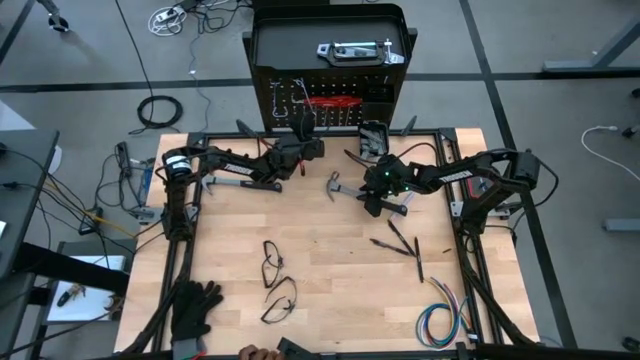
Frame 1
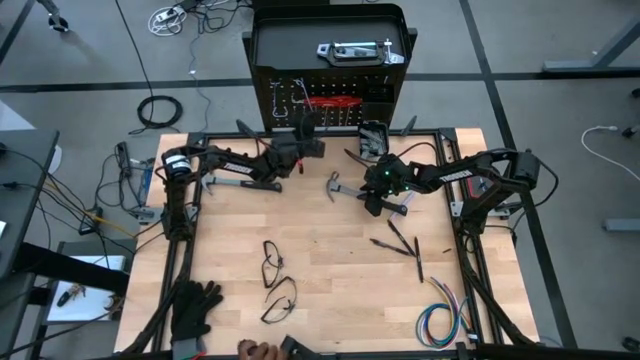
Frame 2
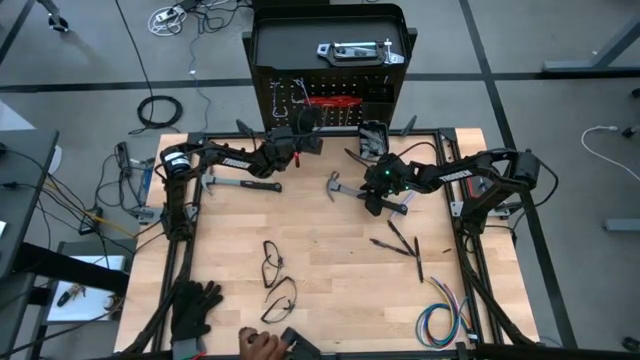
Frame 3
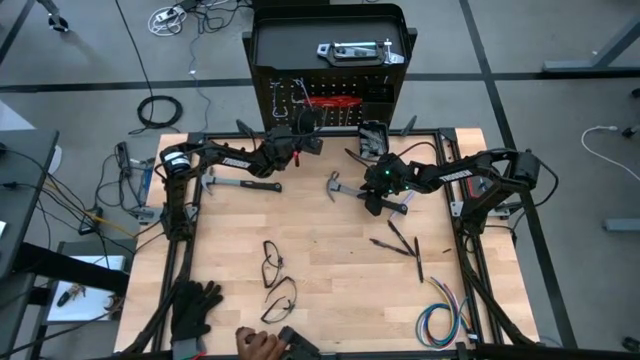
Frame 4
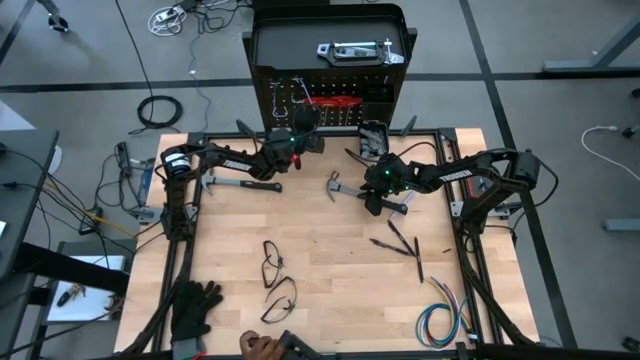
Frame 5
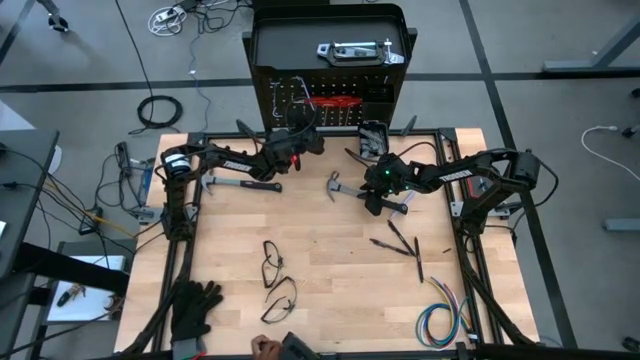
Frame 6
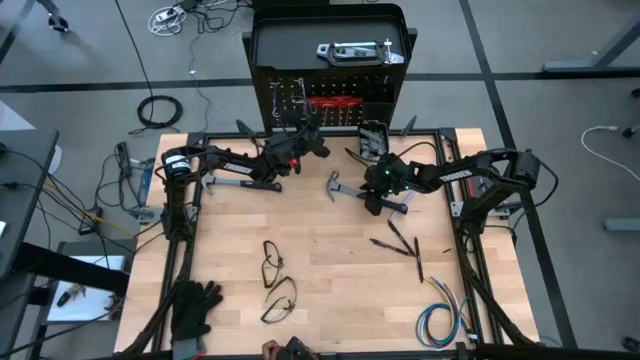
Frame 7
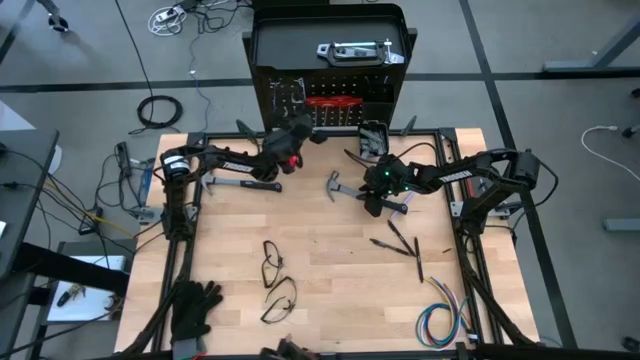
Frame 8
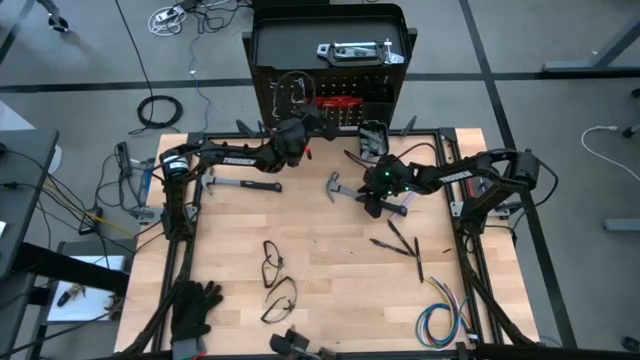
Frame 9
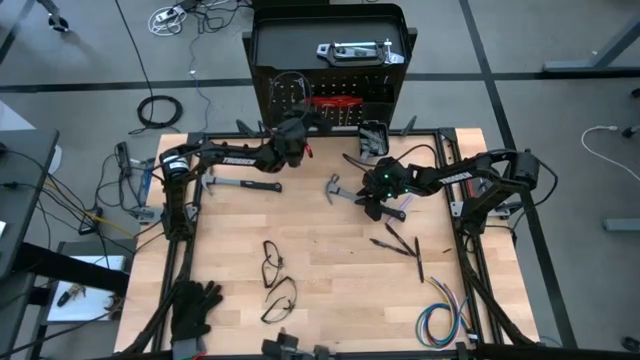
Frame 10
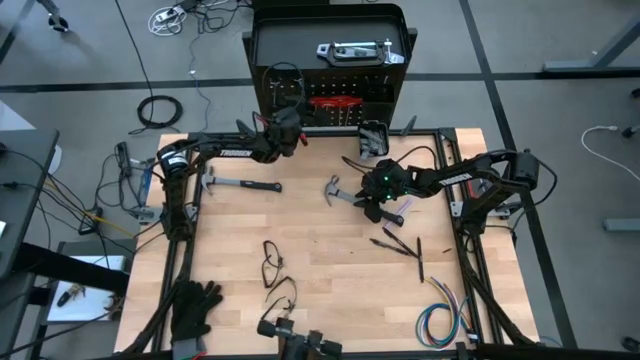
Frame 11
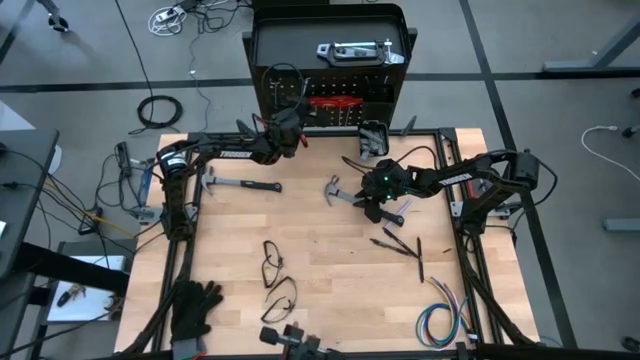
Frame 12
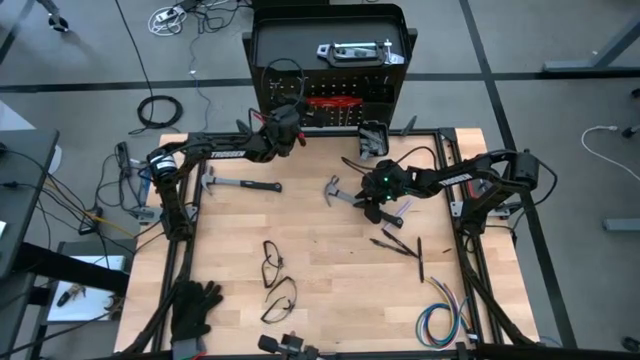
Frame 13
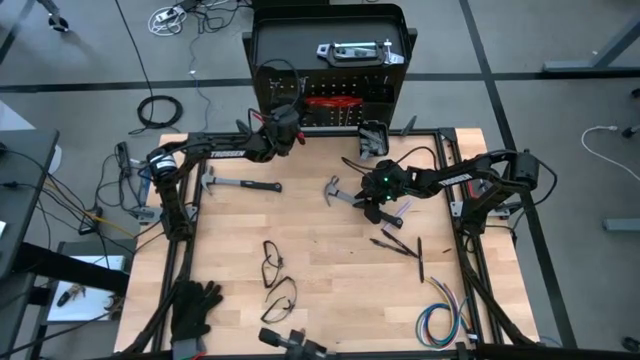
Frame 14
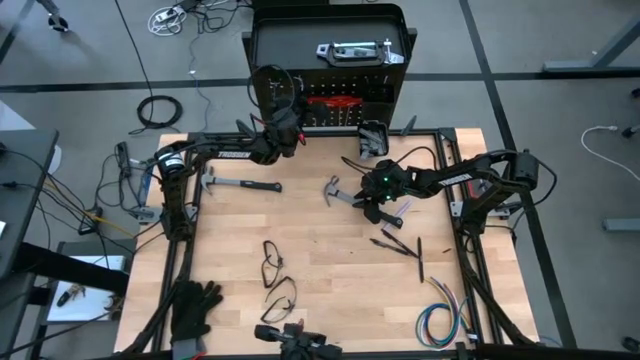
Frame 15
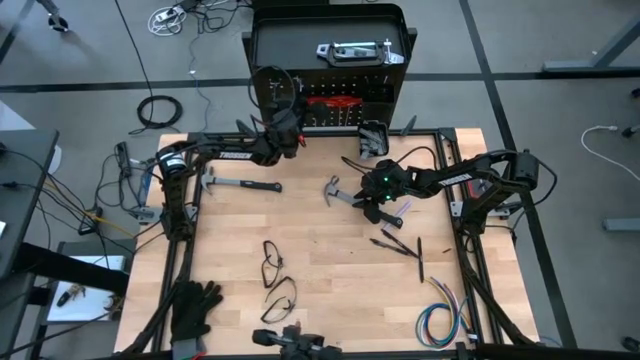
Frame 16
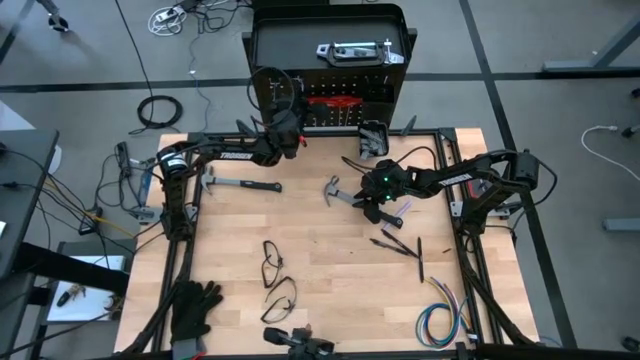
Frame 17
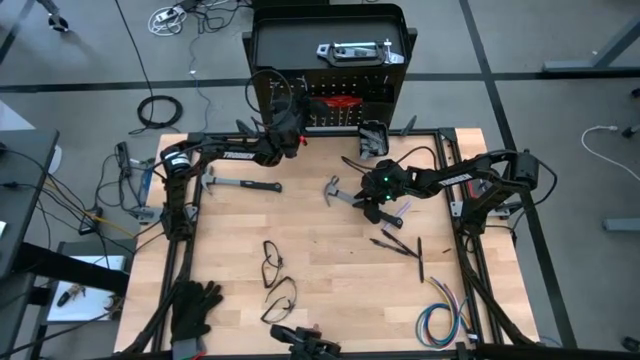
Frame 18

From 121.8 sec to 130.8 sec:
Task: Hang tools onto peg board
Remove the top hook

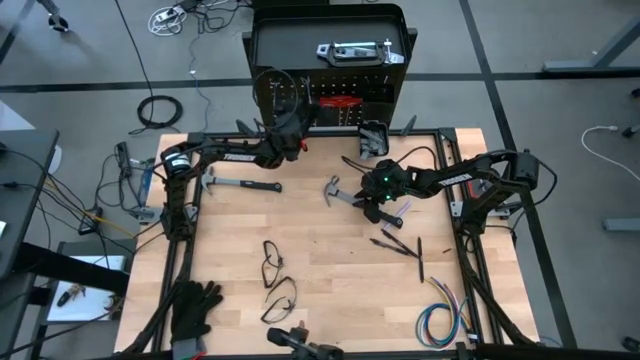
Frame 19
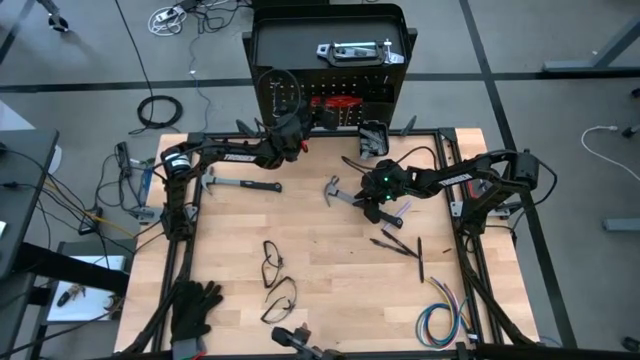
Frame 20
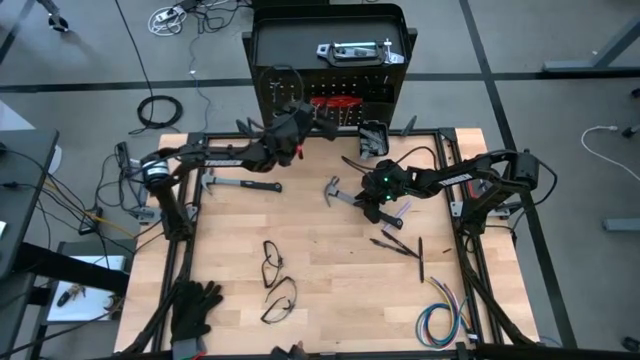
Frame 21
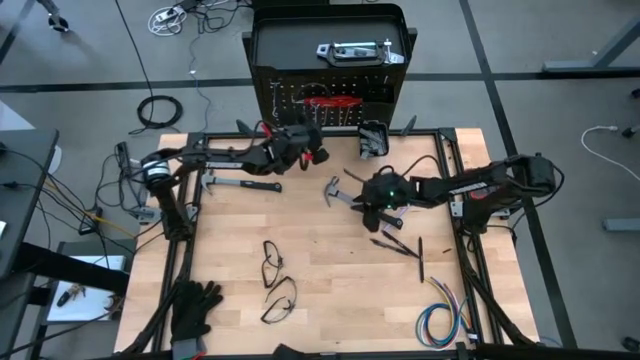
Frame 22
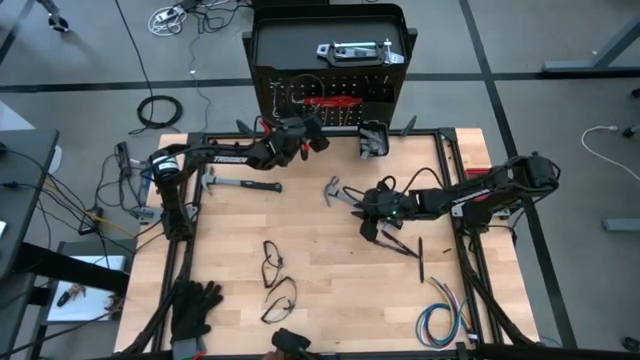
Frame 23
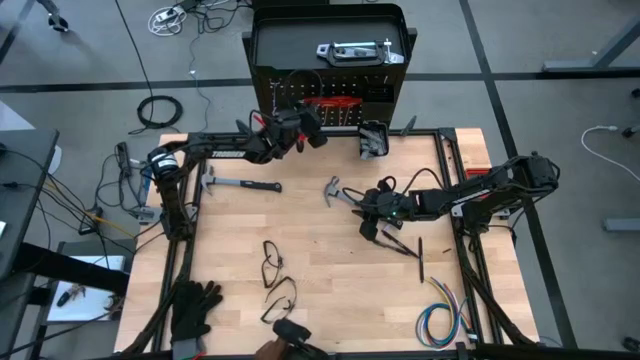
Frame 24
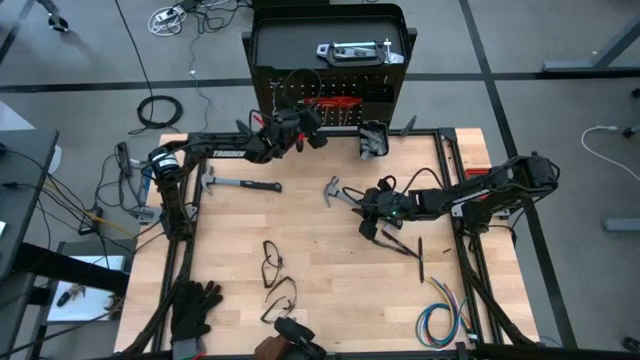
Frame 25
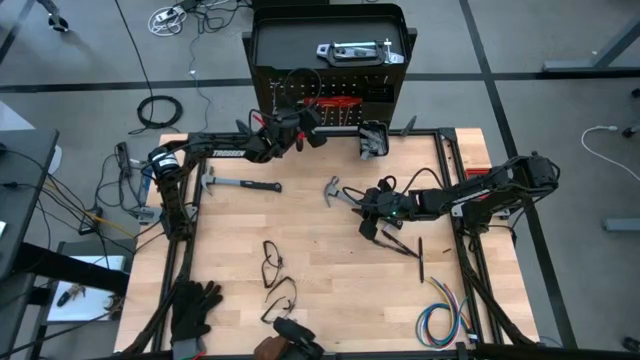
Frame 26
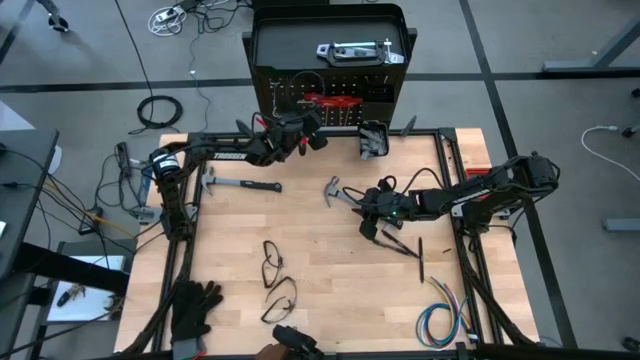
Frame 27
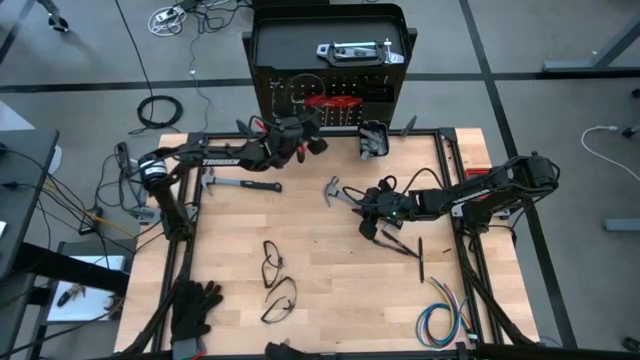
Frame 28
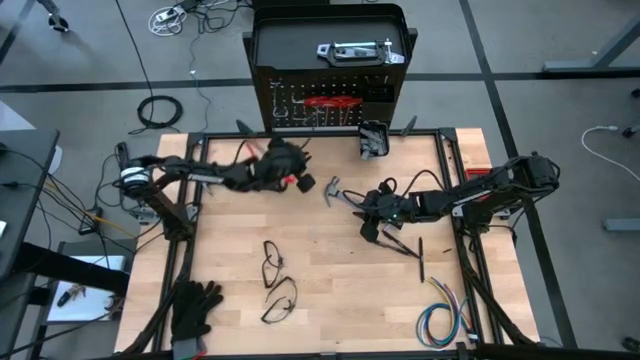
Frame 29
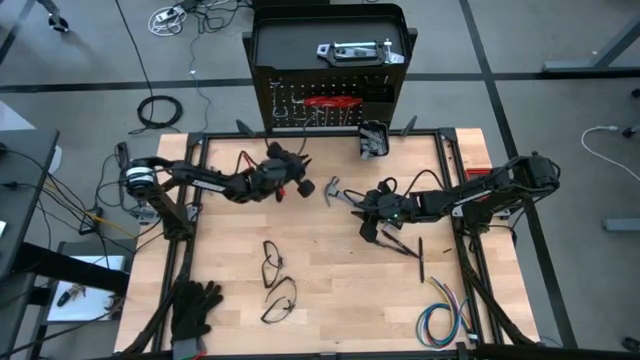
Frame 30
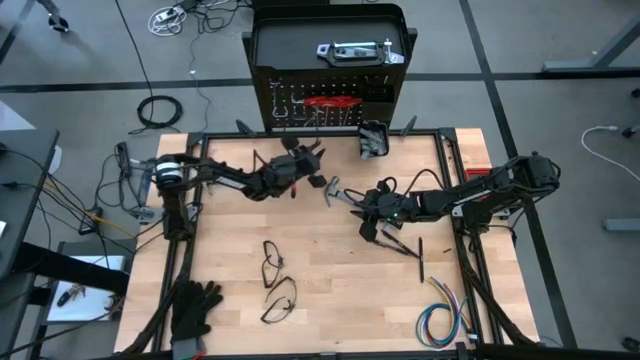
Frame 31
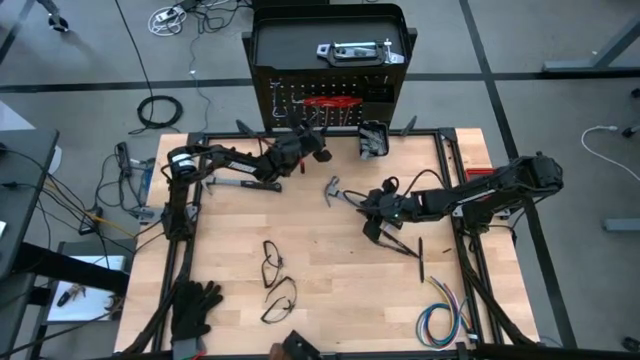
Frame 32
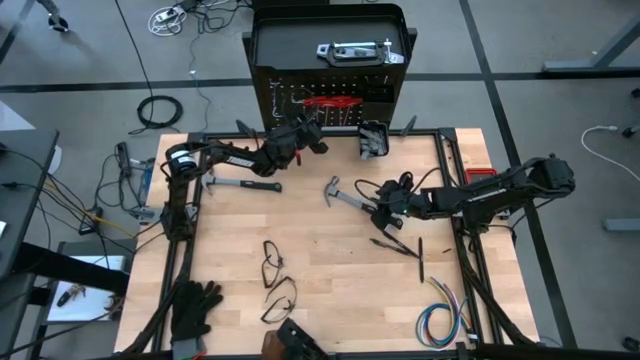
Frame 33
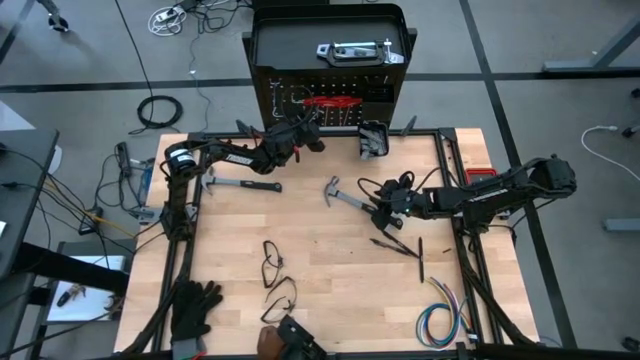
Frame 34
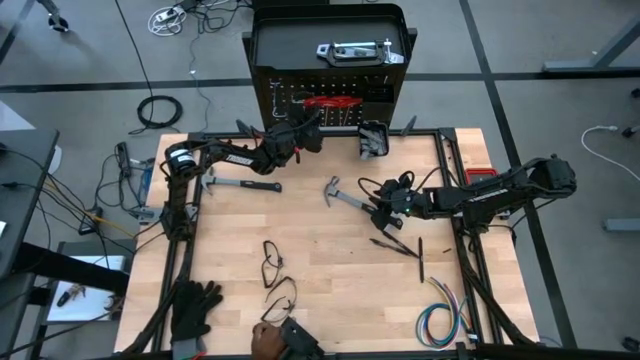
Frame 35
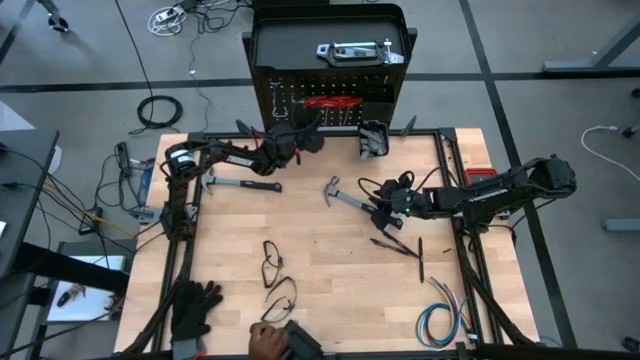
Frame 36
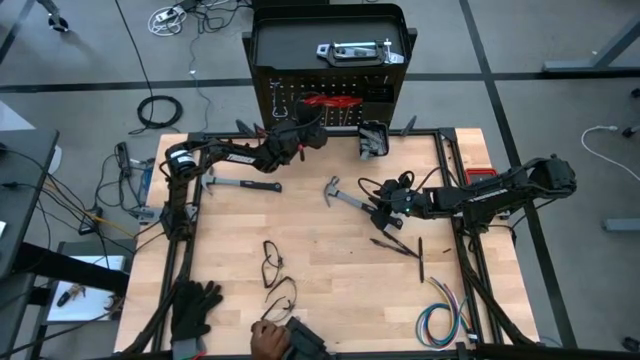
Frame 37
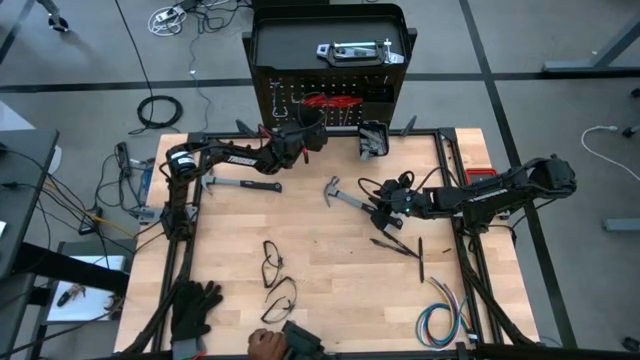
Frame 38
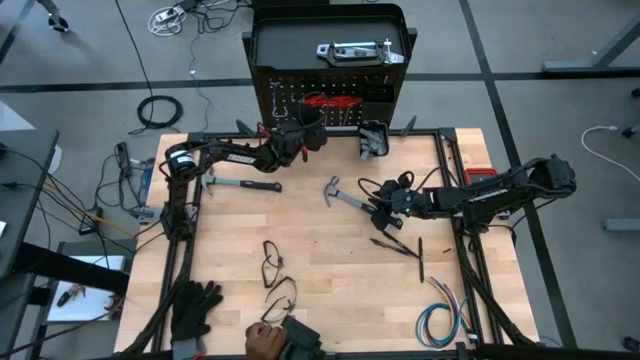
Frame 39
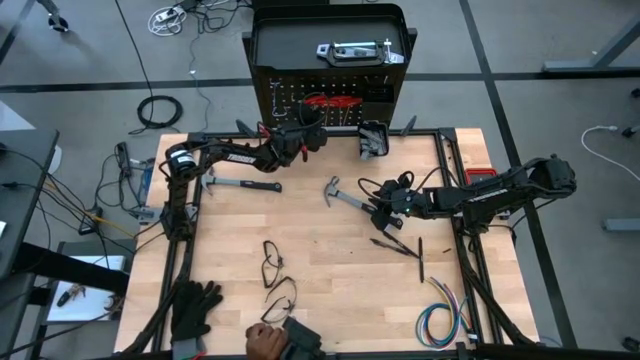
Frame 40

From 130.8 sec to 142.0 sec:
Remove the bottom hook

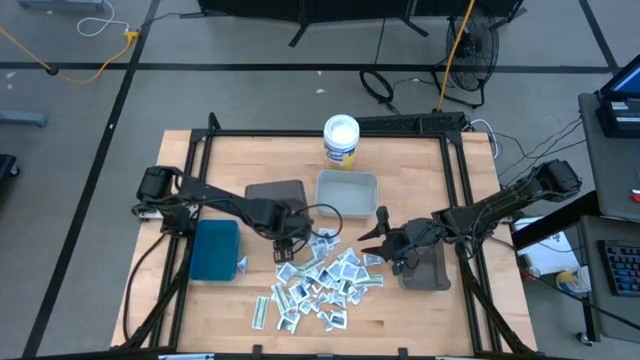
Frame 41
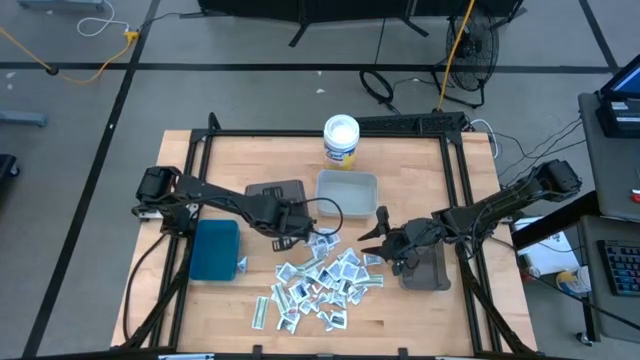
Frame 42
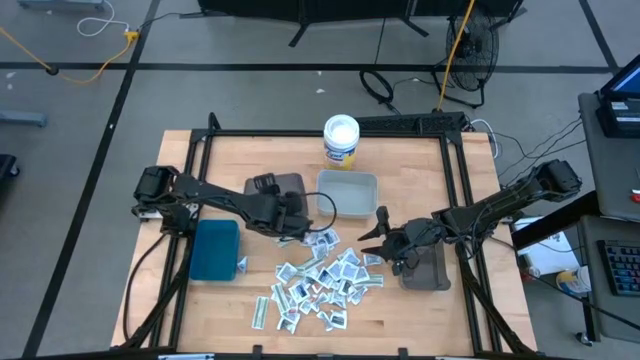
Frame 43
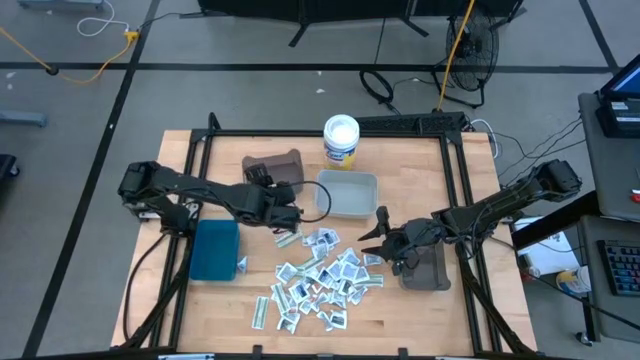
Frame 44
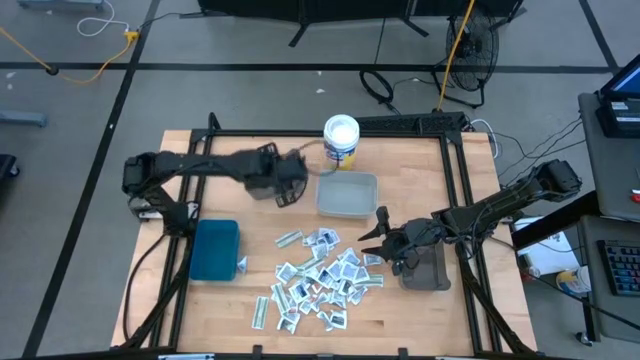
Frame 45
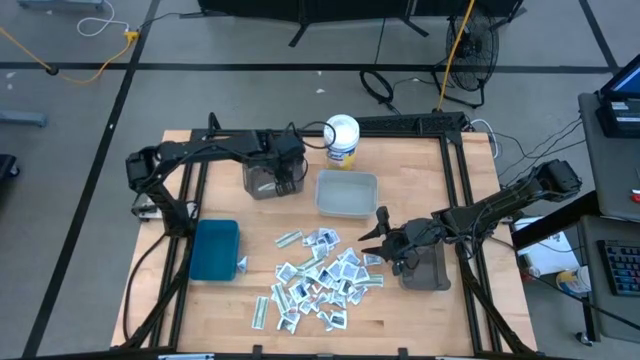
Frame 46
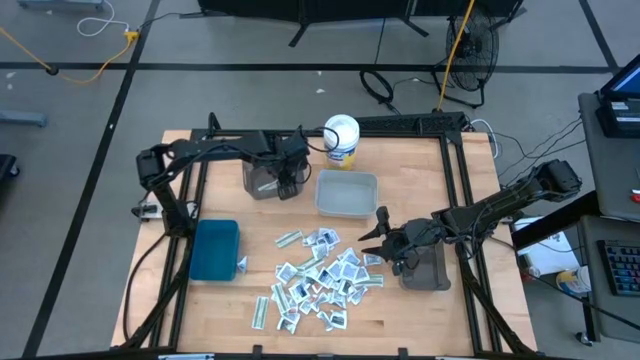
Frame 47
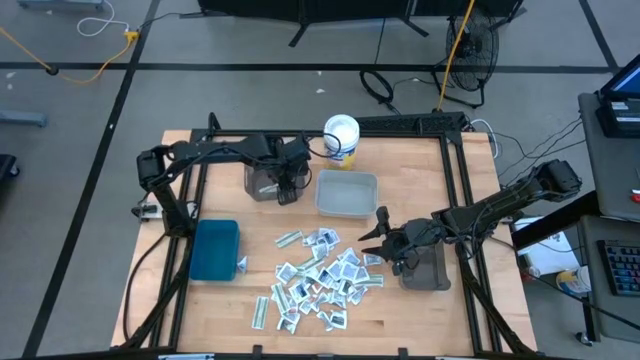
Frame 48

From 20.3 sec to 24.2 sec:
Task: Pick & Place First Aid Supplies
Adjust the top black bin
